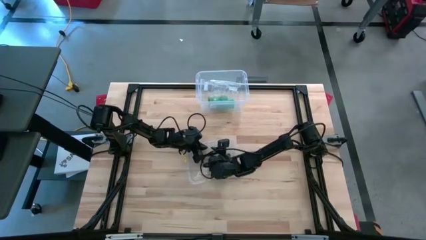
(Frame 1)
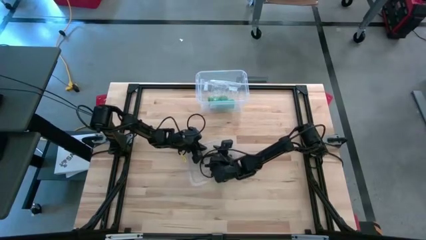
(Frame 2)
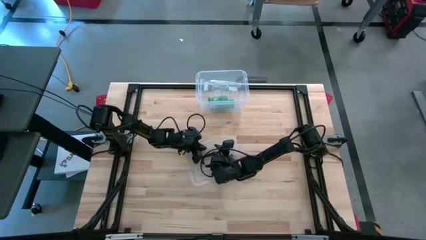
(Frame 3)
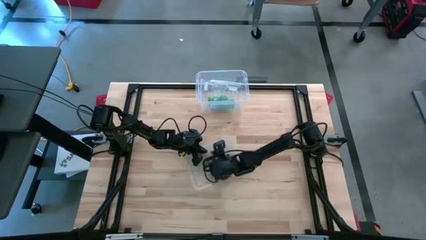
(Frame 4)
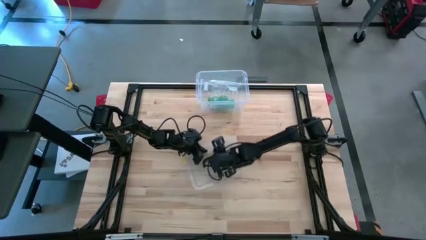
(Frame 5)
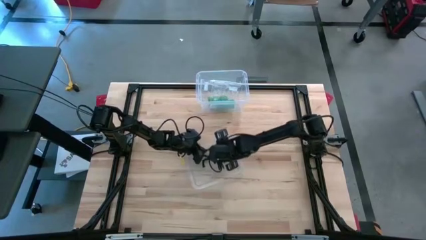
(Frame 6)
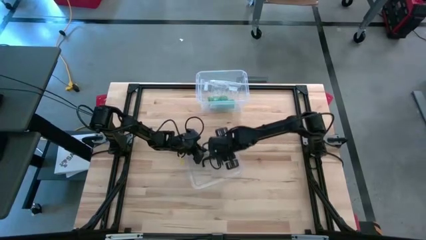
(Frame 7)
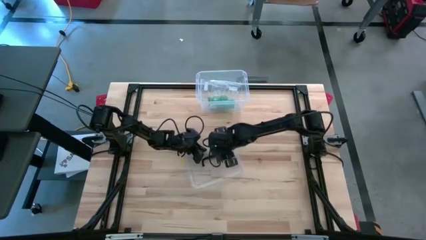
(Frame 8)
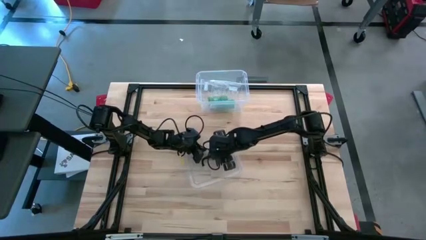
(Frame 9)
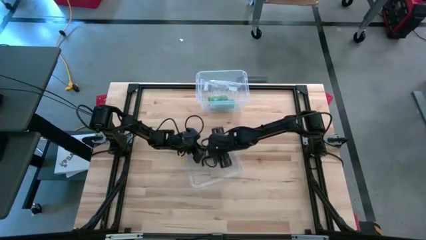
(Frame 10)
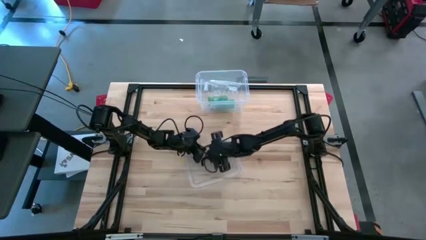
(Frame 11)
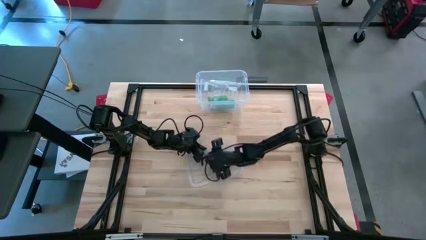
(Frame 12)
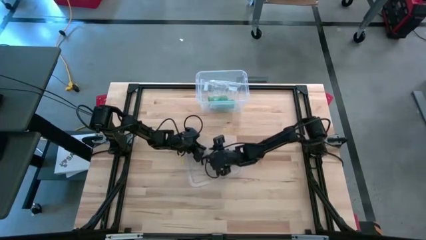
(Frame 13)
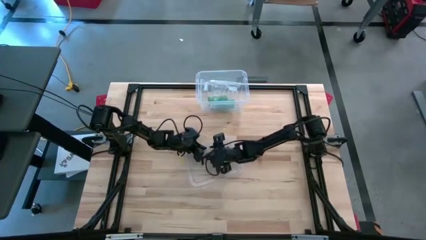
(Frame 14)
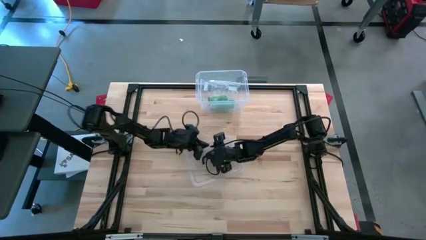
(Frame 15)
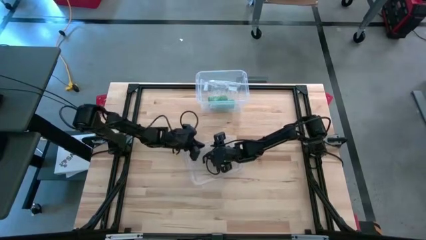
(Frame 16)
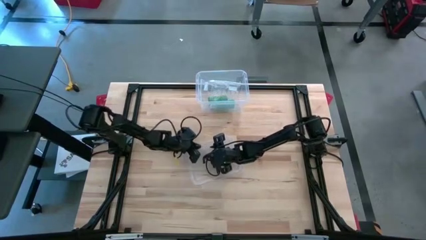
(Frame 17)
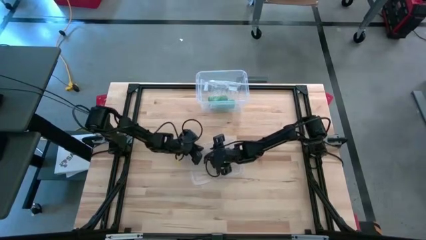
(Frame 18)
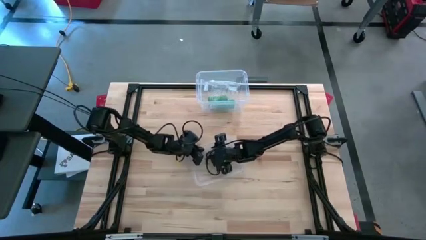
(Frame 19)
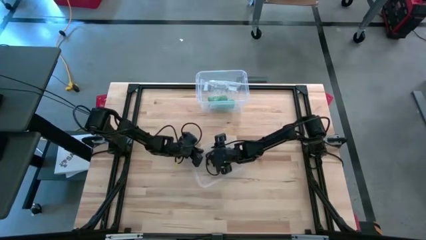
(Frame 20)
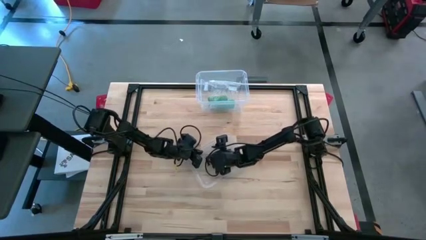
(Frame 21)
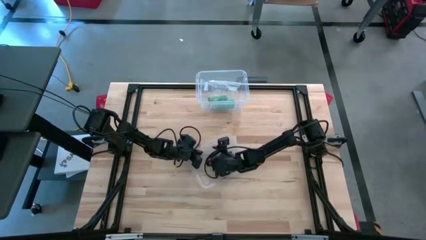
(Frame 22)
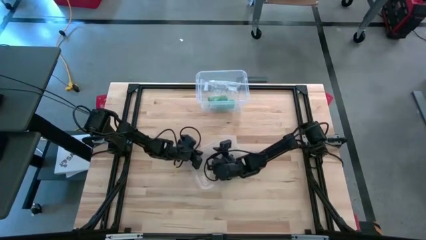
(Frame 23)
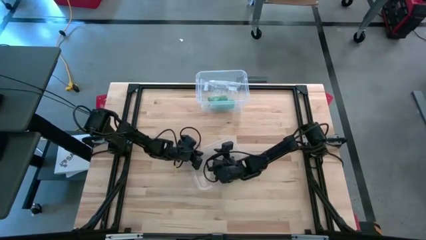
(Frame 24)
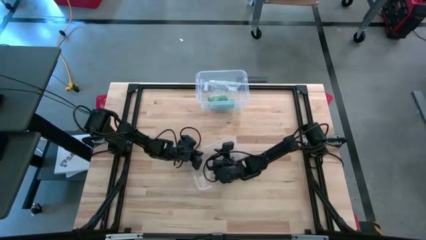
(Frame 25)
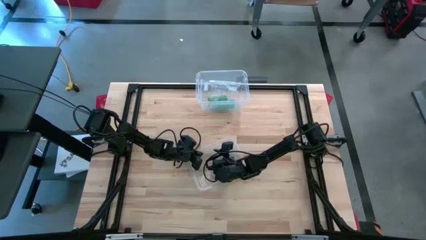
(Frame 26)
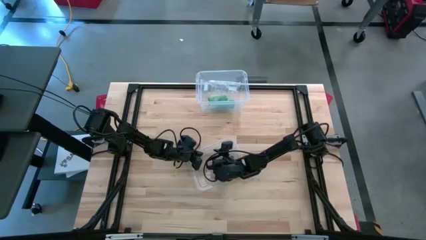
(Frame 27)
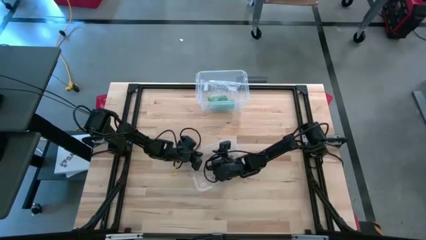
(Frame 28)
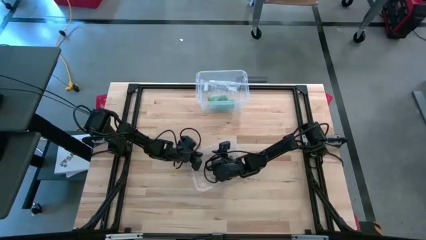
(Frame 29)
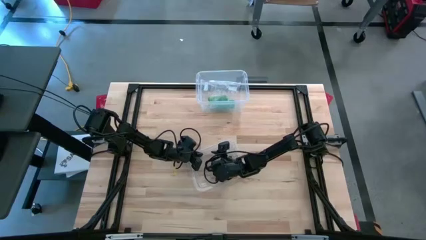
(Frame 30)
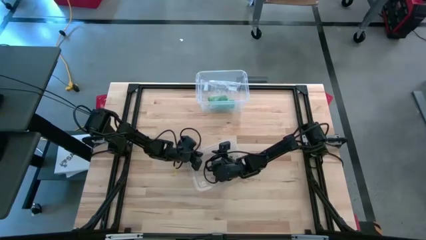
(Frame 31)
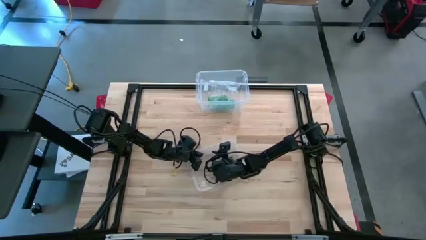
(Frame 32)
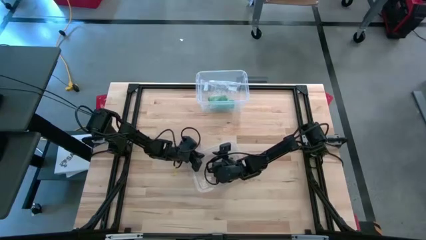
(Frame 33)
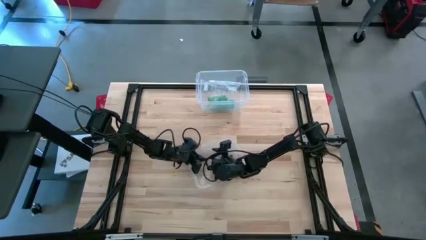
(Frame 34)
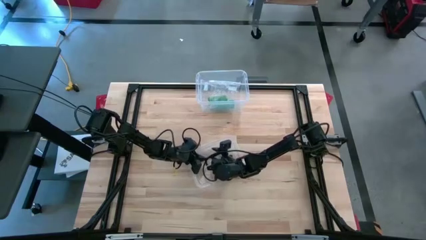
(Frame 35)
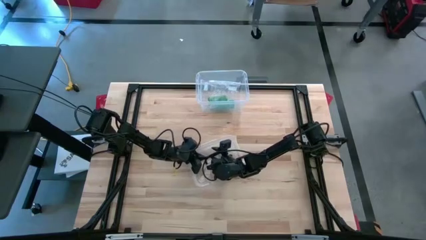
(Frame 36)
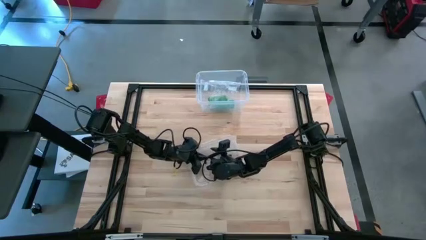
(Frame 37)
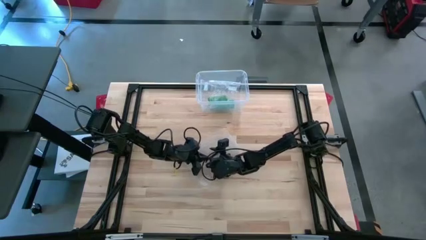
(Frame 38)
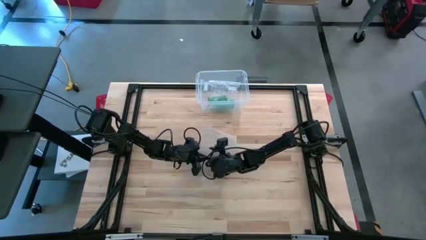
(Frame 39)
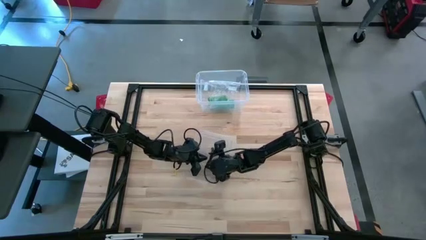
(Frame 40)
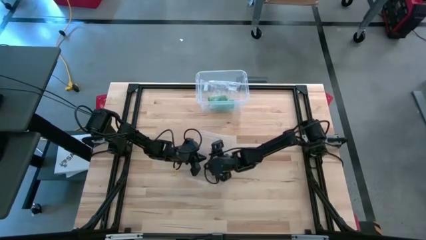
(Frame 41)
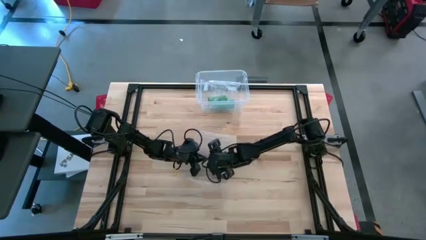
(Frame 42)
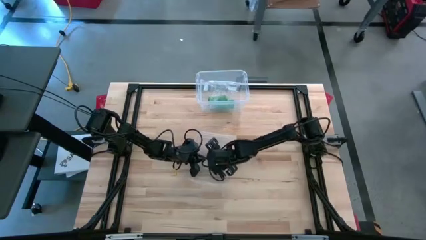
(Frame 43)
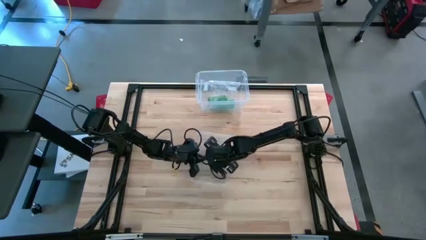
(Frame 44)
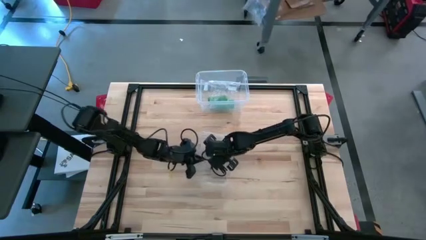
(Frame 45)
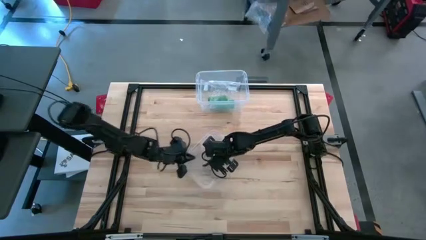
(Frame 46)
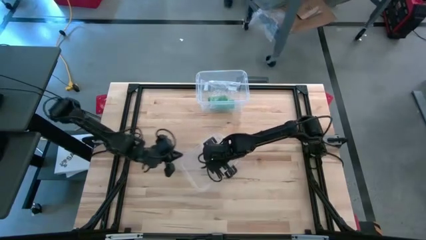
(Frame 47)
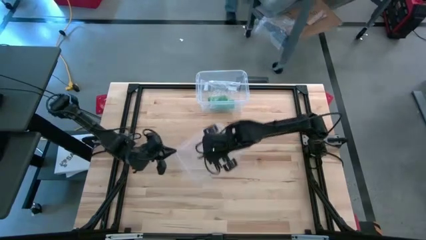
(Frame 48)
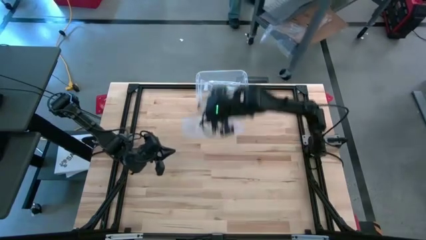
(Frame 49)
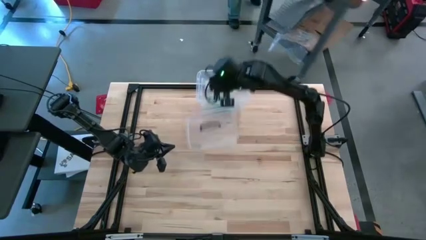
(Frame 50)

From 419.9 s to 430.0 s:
Task: Roll bandage
Close the transparent bin

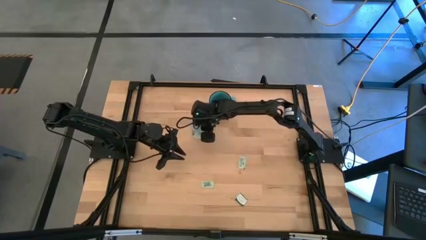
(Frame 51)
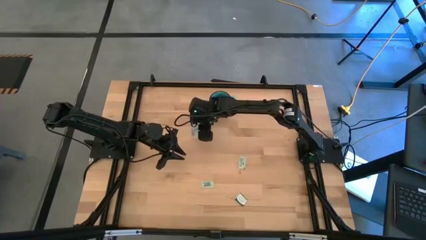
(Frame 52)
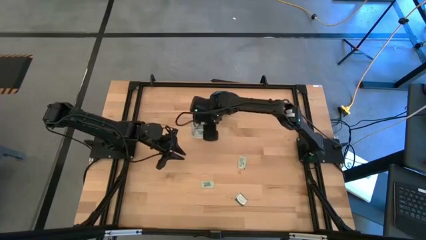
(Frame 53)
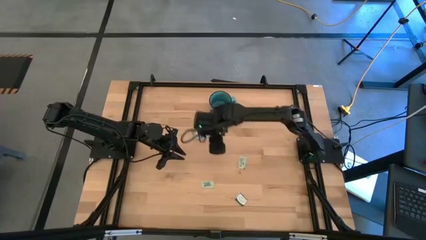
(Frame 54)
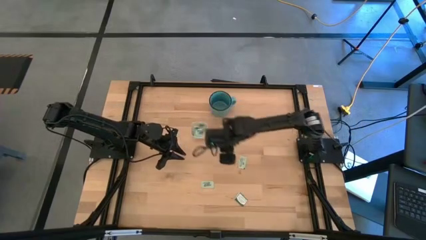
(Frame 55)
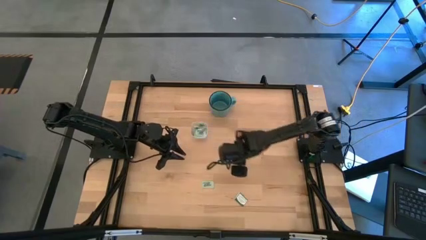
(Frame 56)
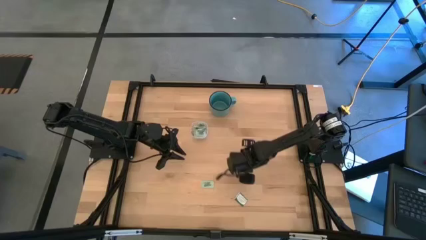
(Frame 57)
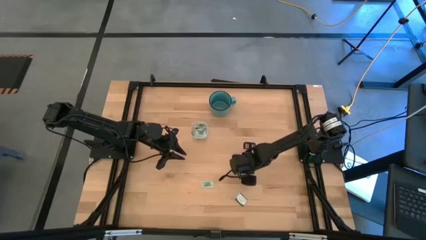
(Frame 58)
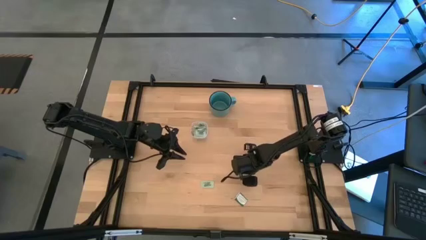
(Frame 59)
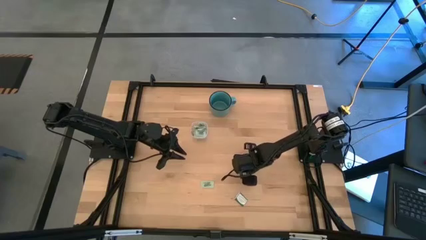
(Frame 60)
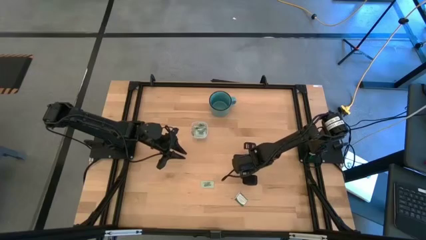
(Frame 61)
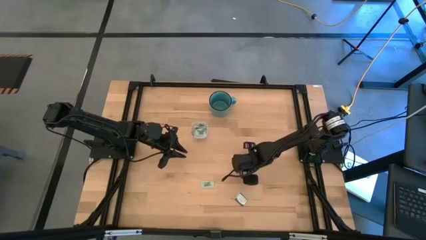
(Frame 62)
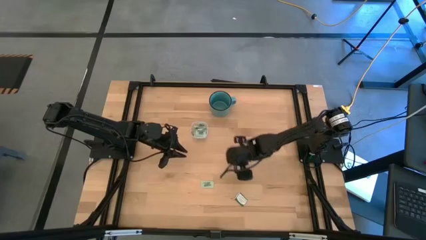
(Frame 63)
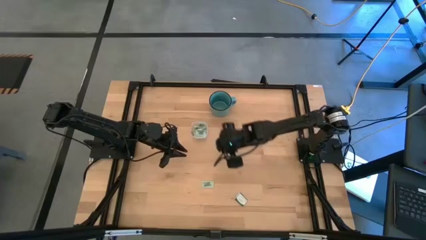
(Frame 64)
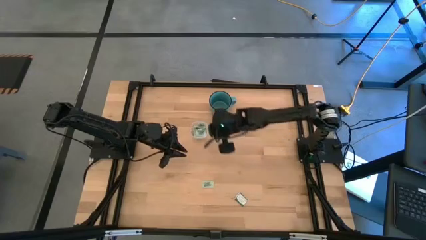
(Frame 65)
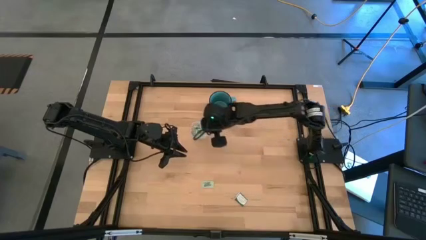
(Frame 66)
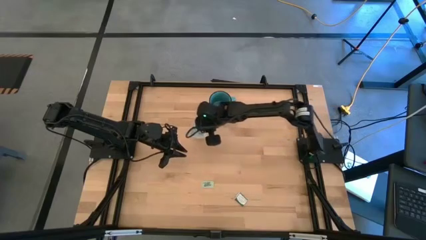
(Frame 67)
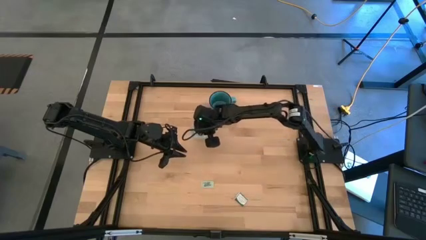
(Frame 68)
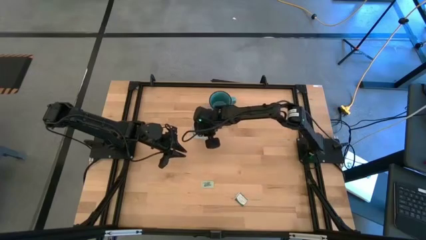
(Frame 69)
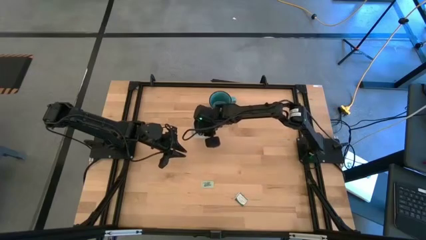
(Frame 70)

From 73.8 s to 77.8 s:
Task: Pick and place Stevia / Truvia into bins
Put the green stevia packet into the transparent container

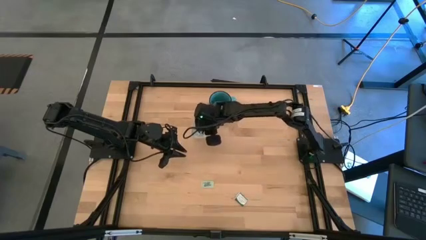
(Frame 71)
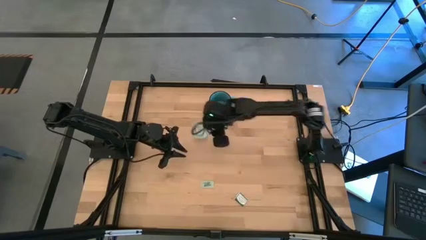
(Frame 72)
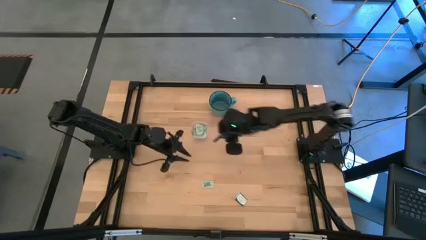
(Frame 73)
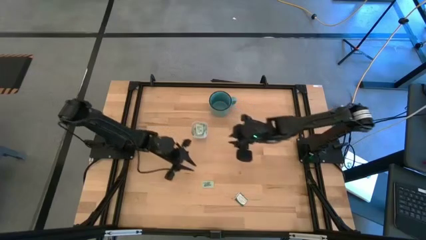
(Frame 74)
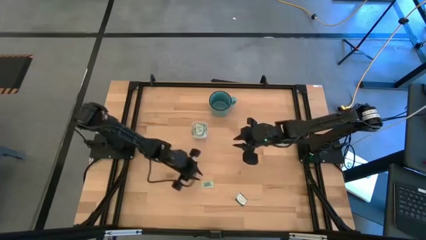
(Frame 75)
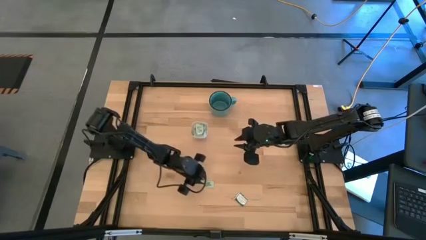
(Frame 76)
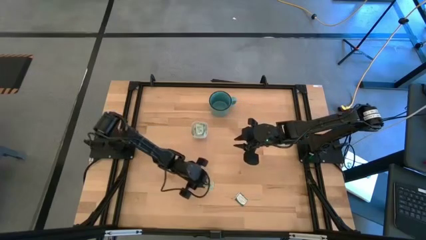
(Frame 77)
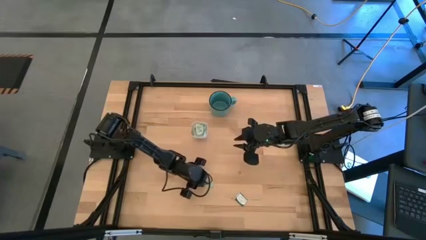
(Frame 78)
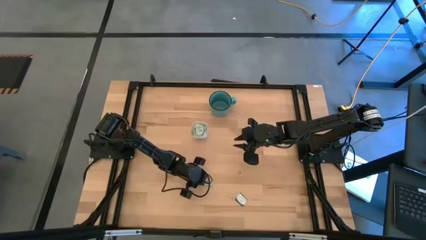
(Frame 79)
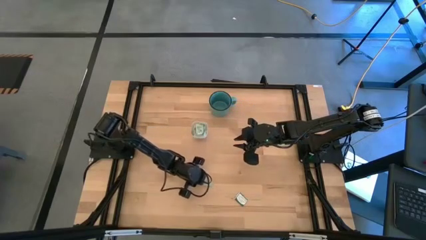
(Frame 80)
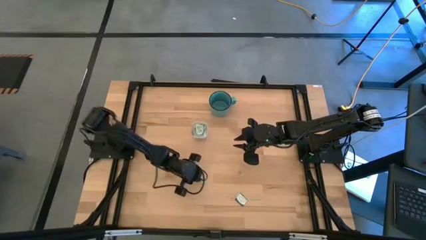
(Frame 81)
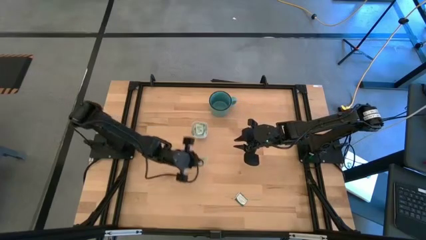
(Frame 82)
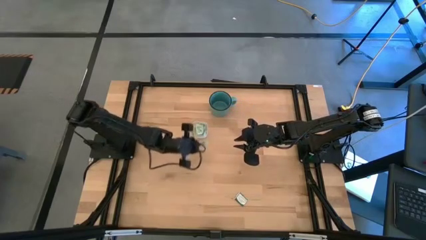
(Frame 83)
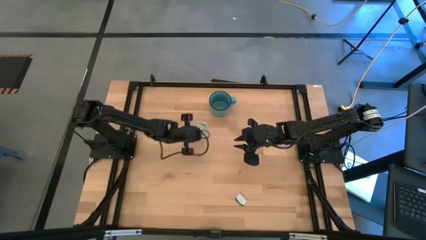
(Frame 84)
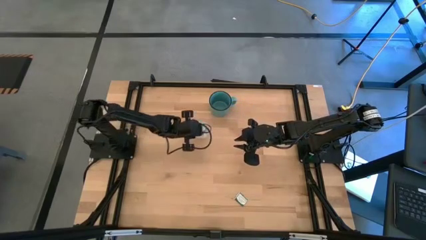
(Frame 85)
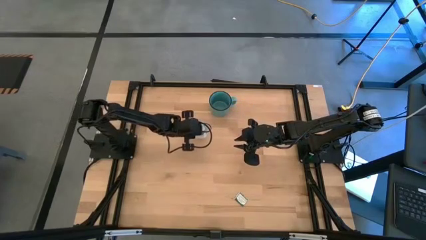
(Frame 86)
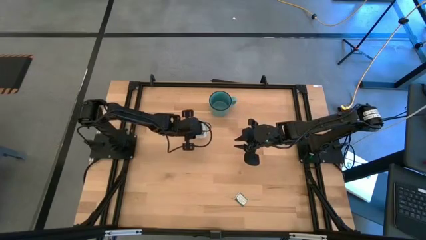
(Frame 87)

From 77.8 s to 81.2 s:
Put the green stevia packet into the transparent container
